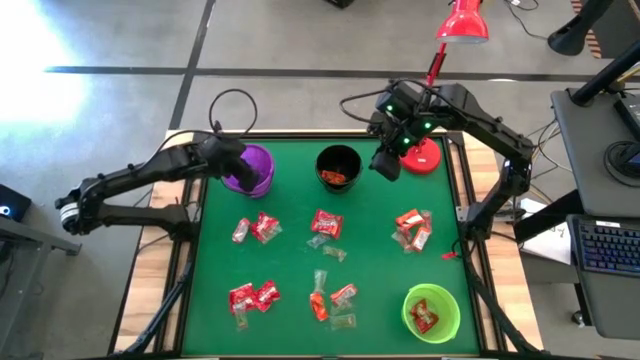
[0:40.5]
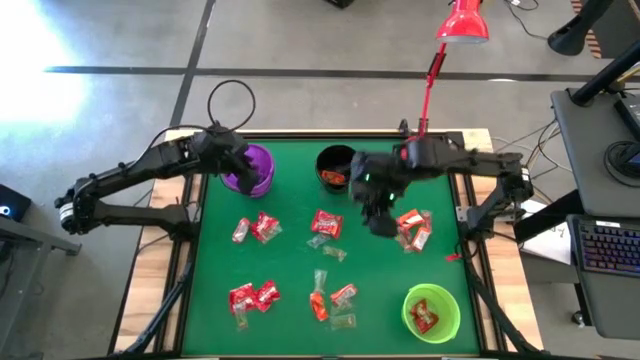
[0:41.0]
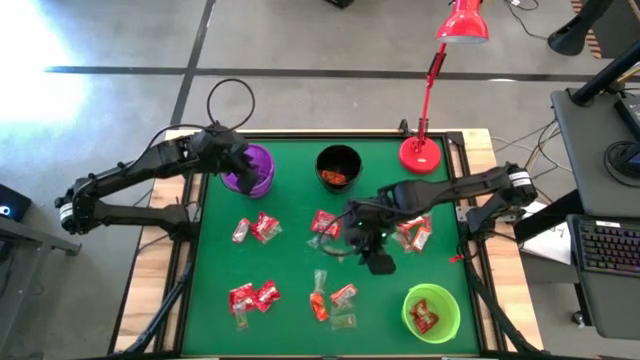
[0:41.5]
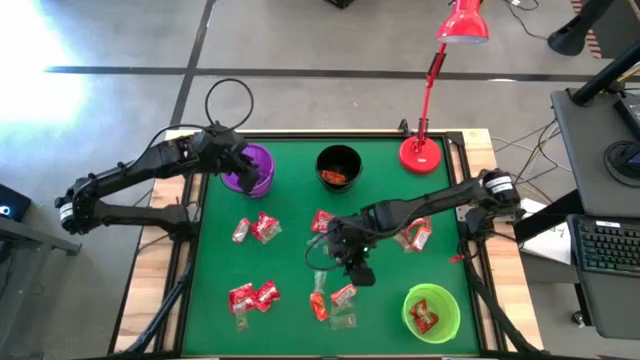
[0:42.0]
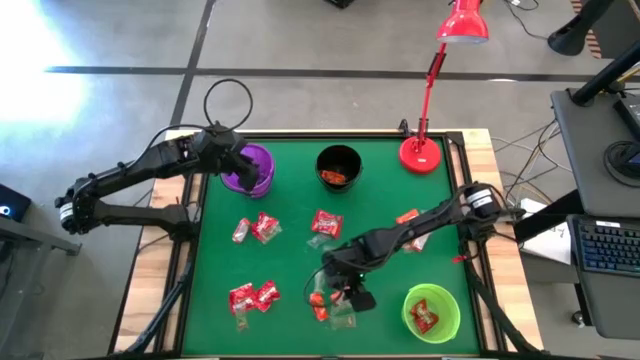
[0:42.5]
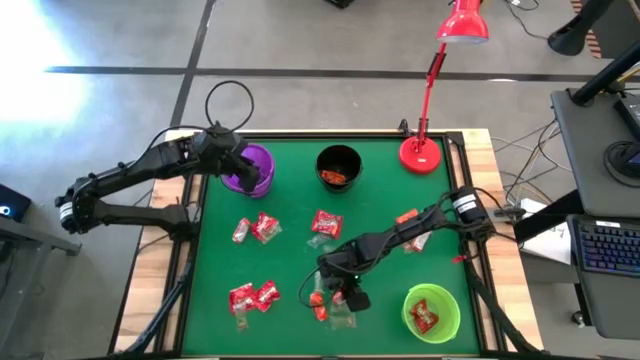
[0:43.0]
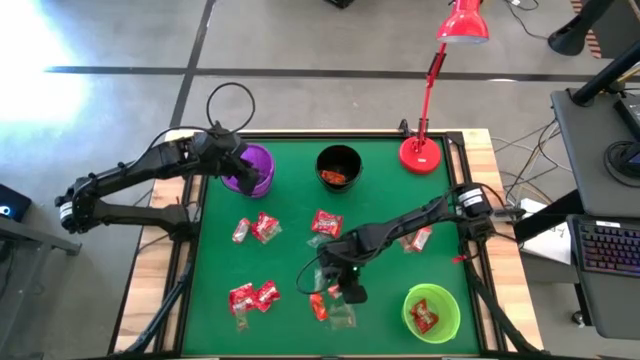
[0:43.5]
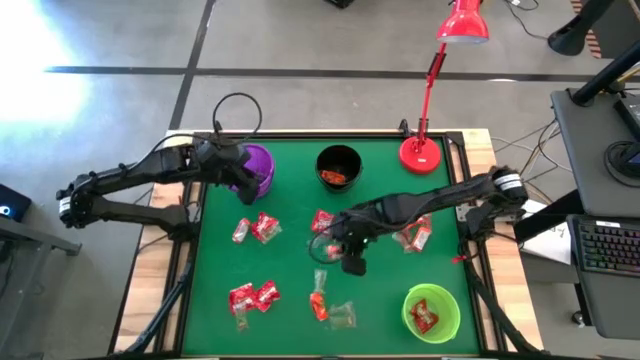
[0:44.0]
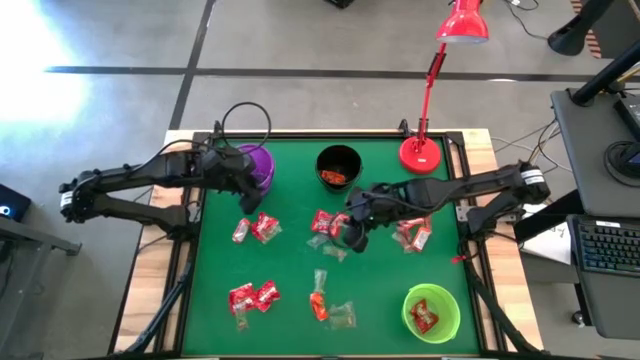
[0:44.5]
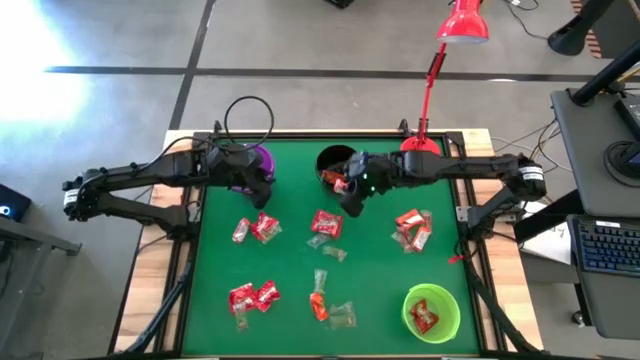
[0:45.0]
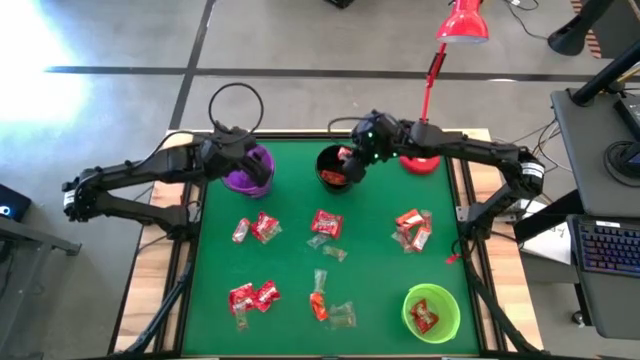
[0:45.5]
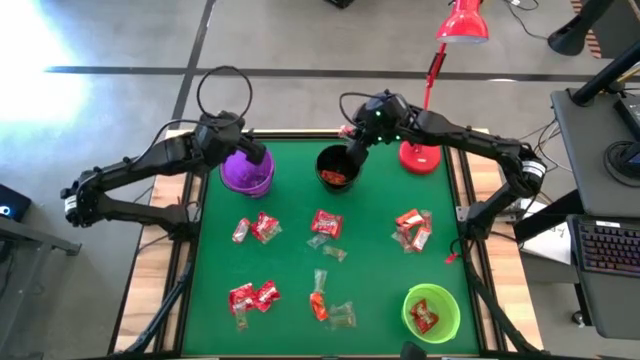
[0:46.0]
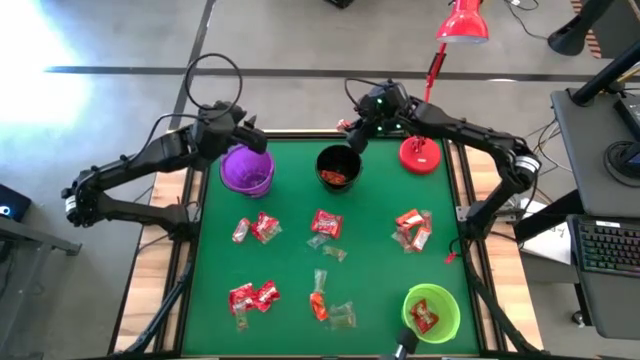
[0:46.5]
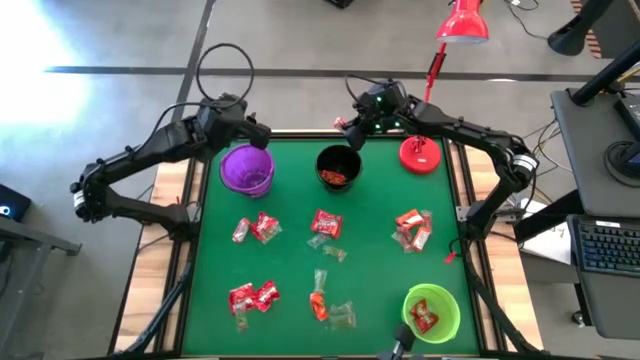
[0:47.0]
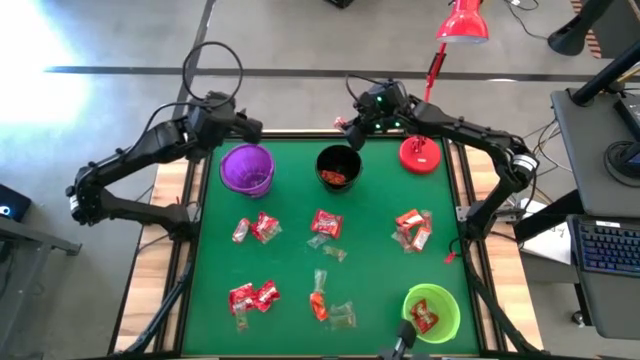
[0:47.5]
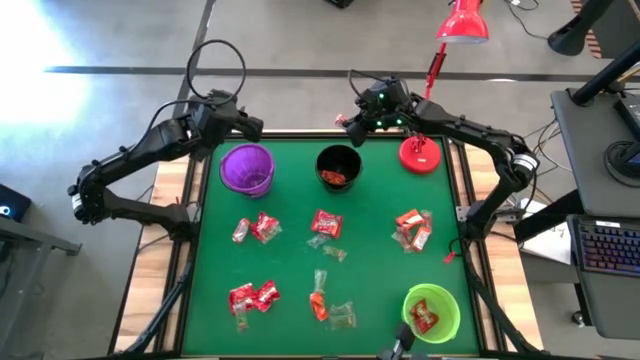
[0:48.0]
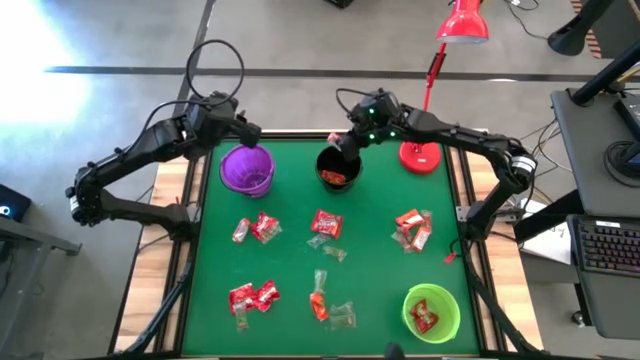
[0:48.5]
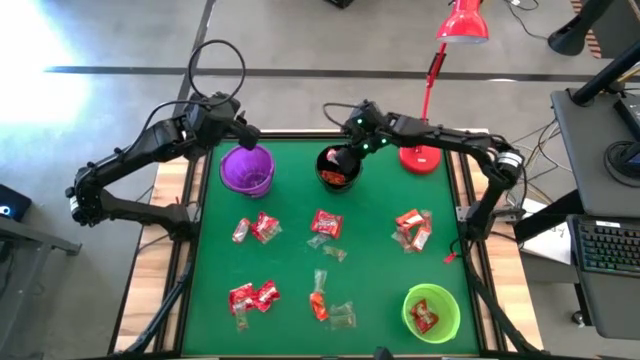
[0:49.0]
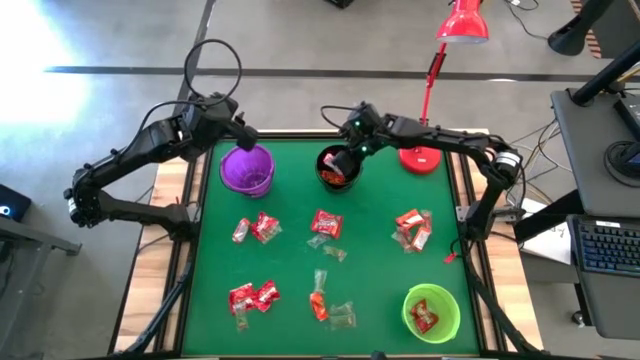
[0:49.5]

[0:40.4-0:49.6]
Task: Sort candy
Put the orange chocolate into the black bucket

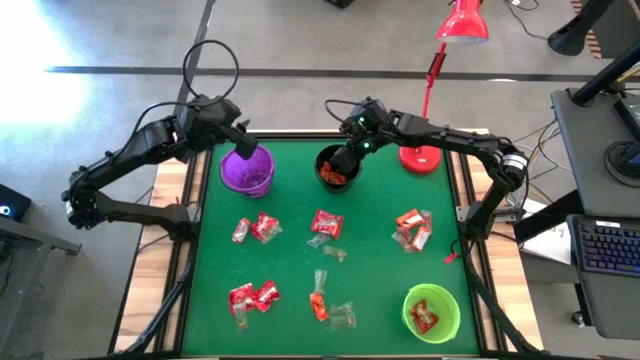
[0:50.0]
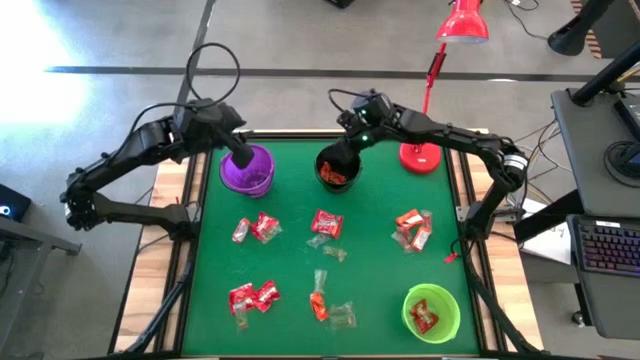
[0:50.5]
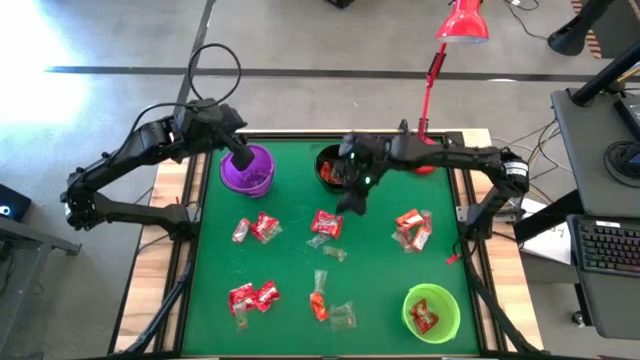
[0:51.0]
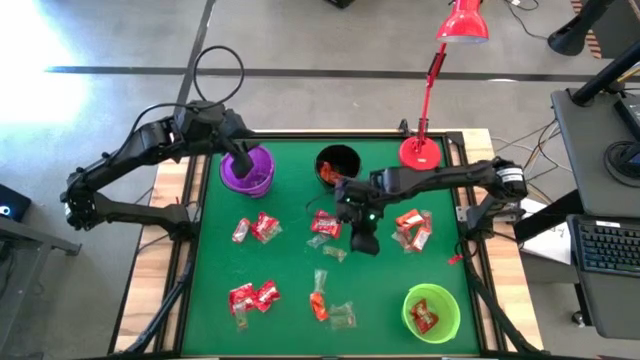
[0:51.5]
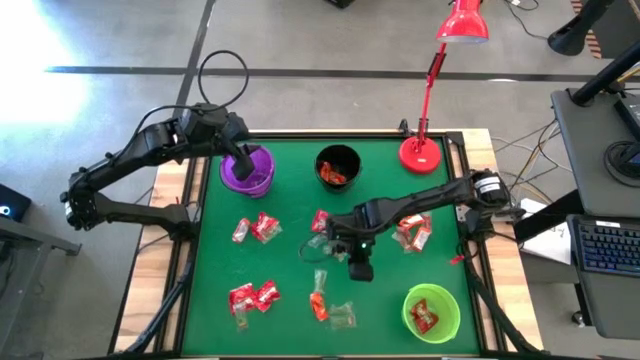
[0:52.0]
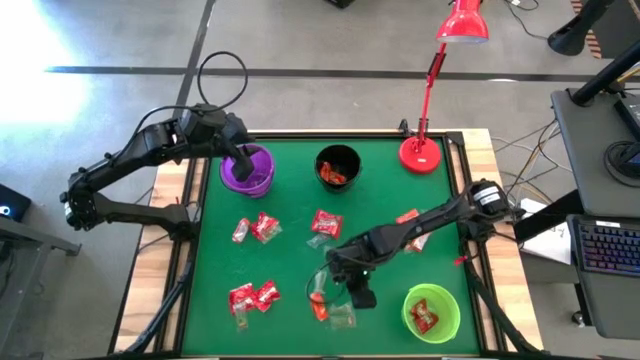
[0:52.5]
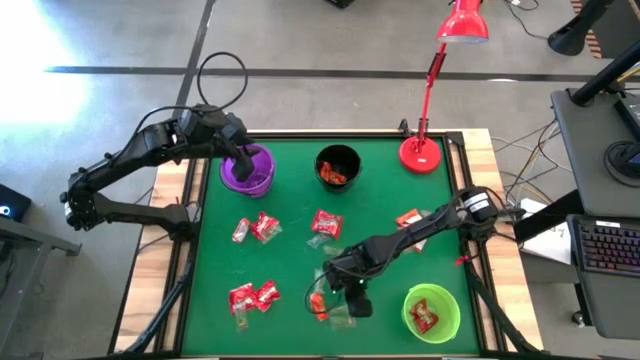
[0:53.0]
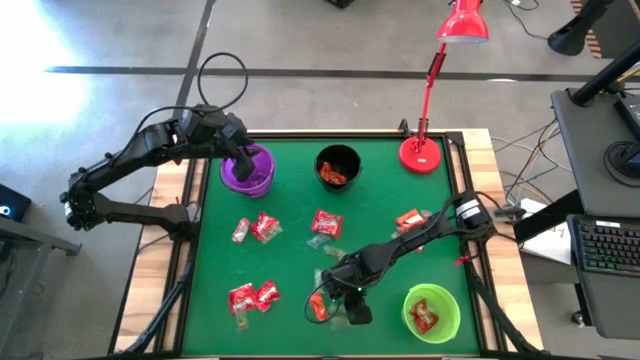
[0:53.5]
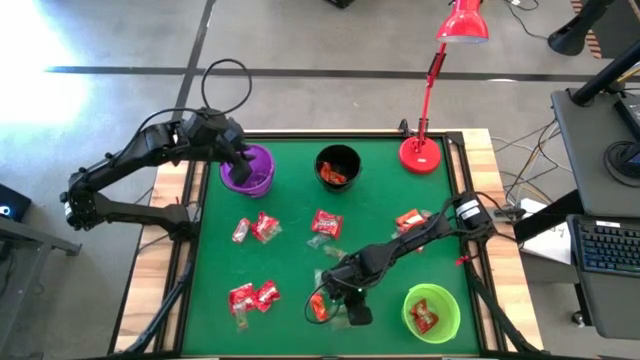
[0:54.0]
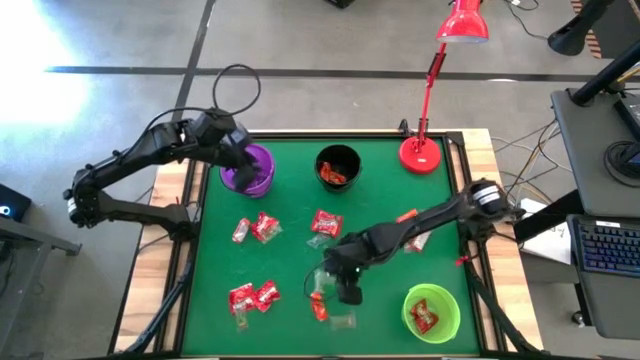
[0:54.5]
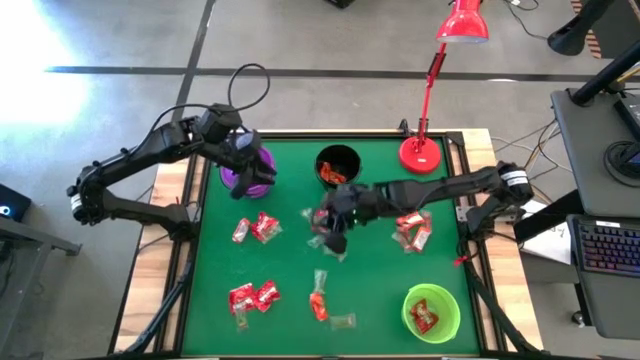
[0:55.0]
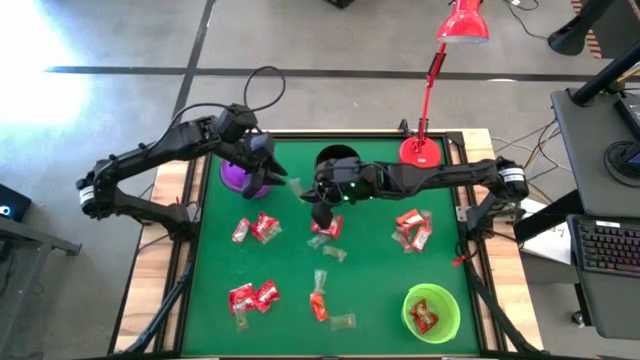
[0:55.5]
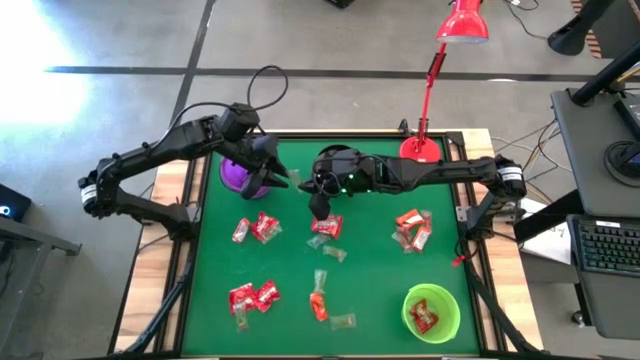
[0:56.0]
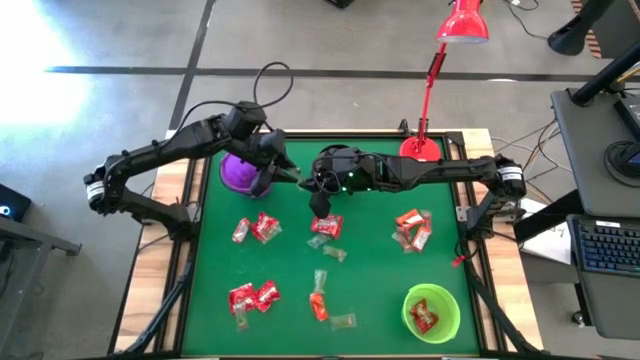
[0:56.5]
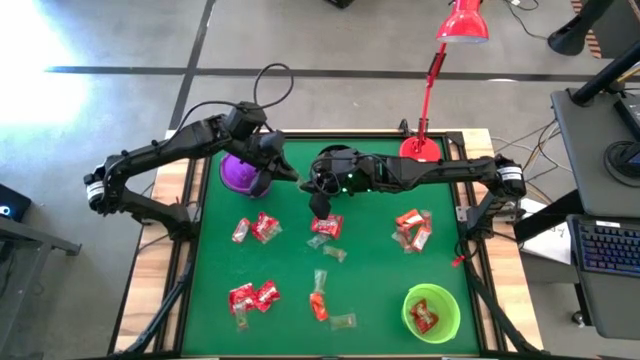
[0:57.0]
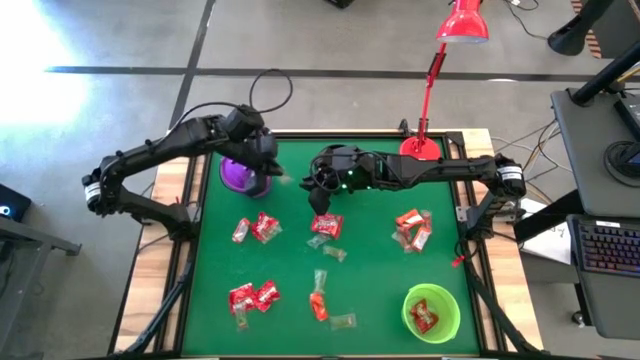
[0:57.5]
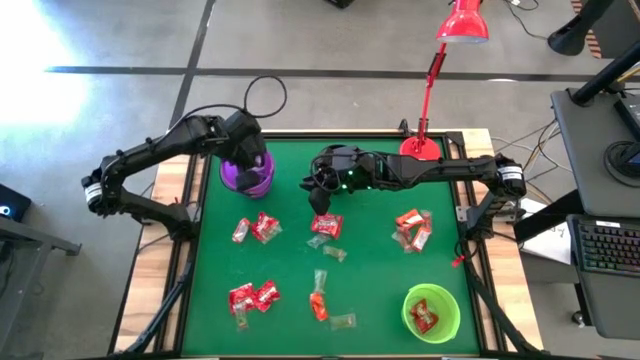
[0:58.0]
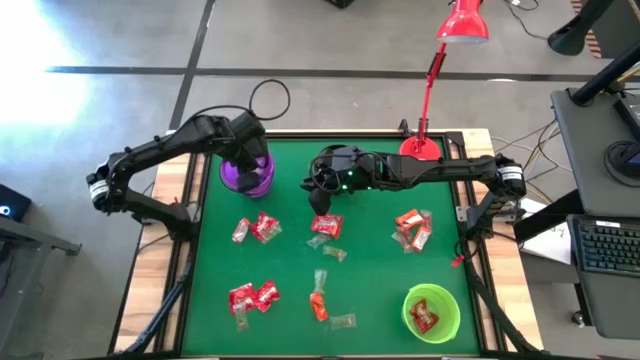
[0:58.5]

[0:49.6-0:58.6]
Put the green gummy into the violet bucket

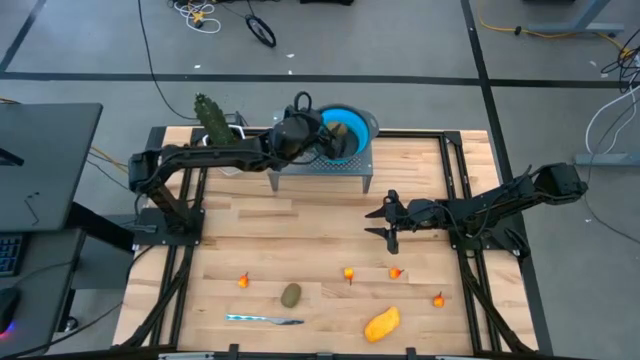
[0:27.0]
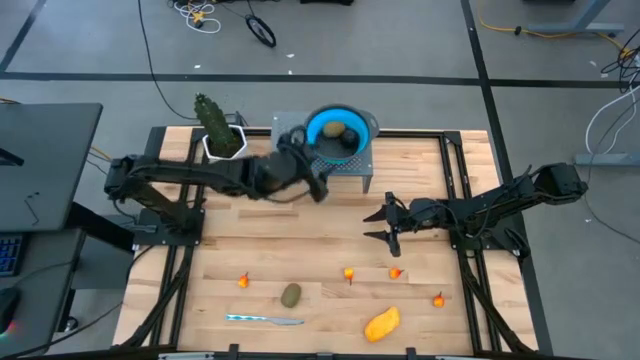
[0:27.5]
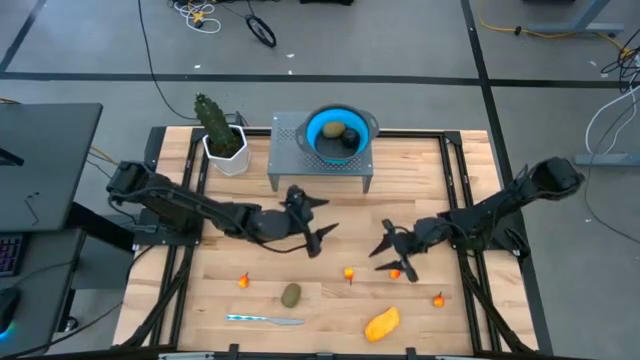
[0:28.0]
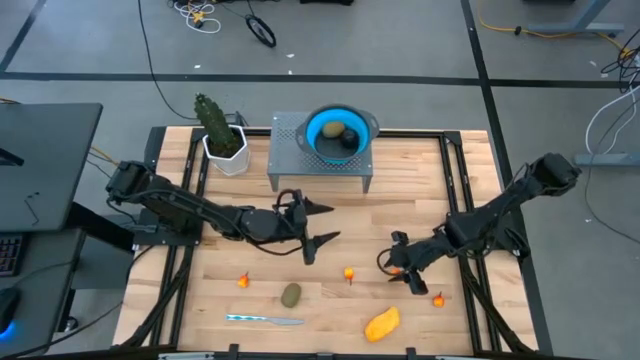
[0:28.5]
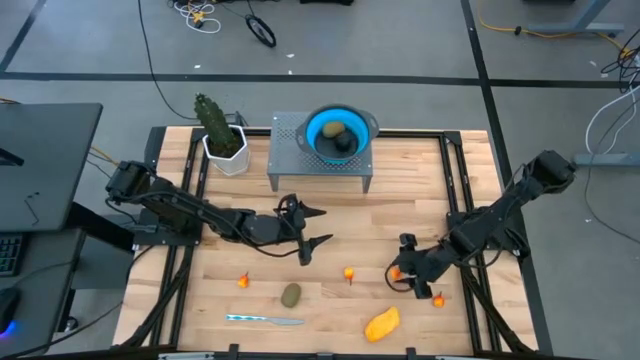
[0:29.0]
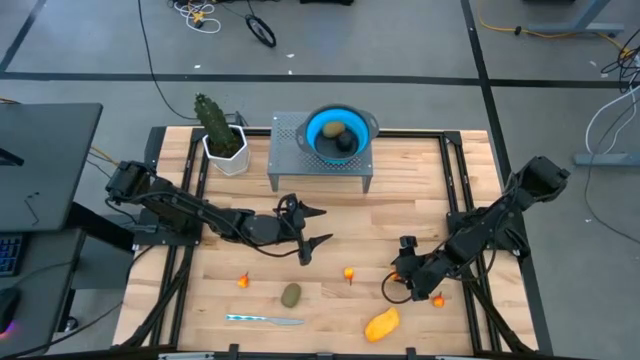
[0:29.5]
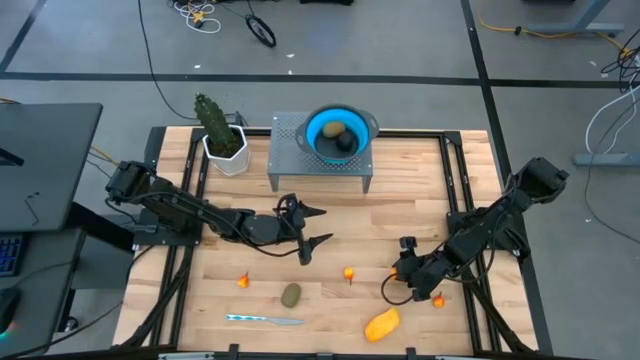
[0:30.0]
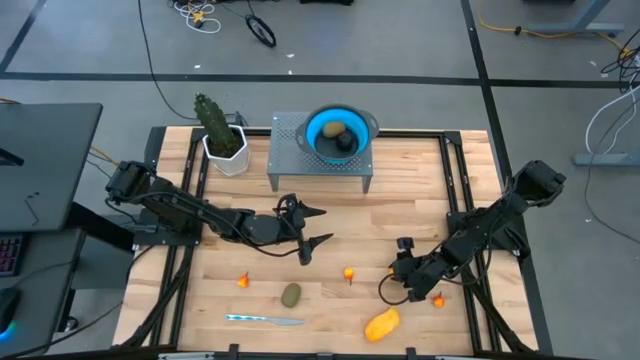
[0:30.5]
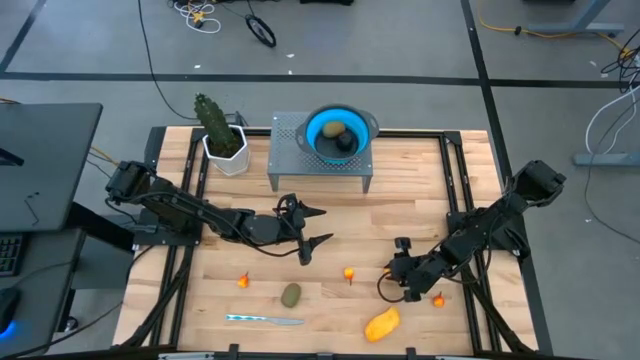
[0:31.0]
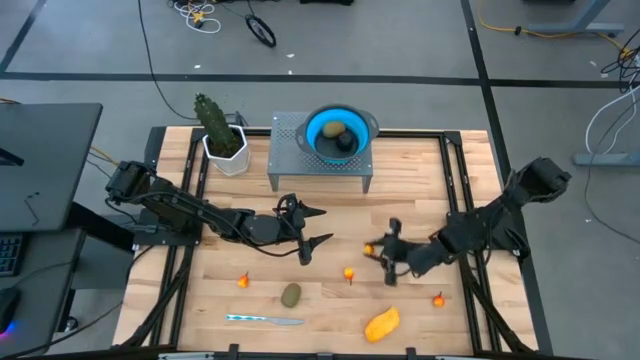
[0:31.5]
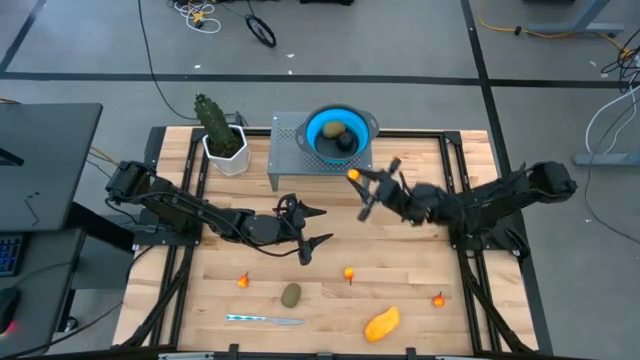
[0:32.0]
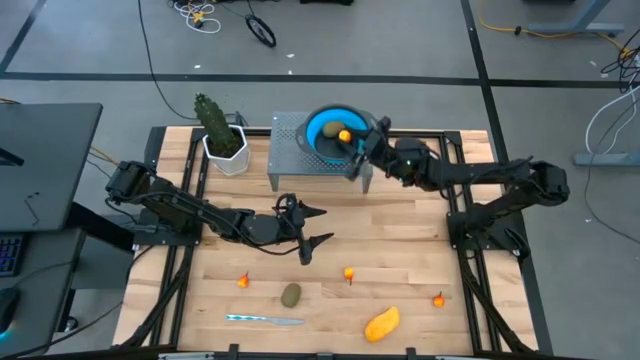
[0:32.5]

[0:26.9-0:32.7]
Task: Pick & Place Fruit
Put the orange peach in the blue strainer bowl on the shelf
